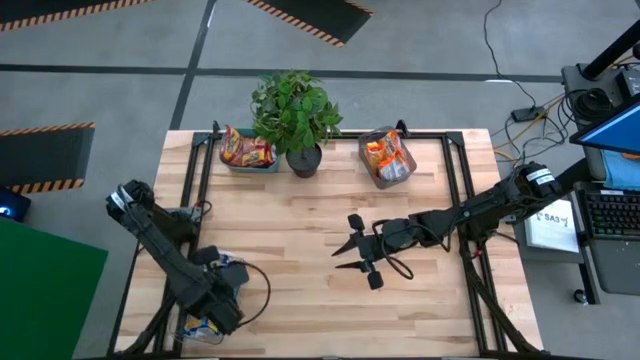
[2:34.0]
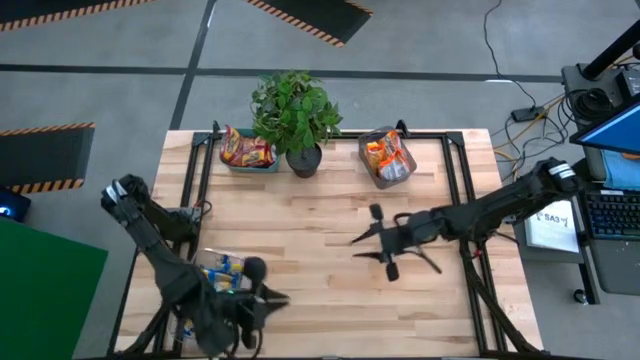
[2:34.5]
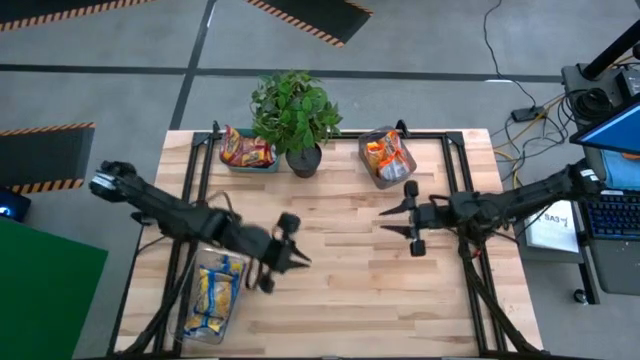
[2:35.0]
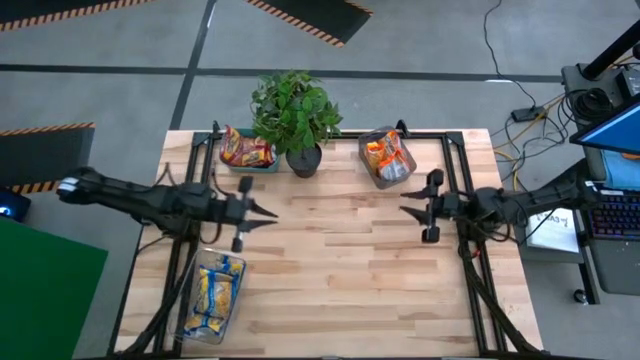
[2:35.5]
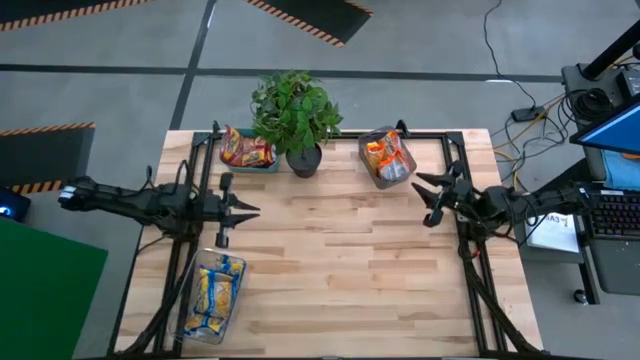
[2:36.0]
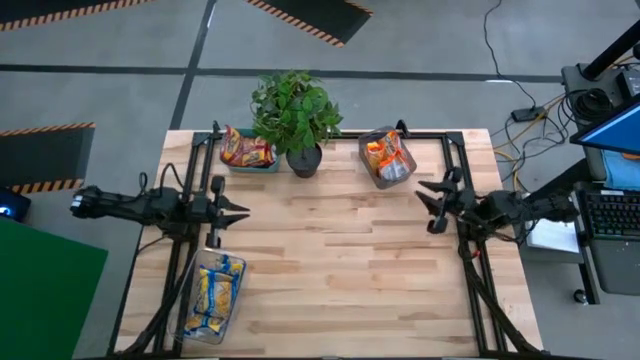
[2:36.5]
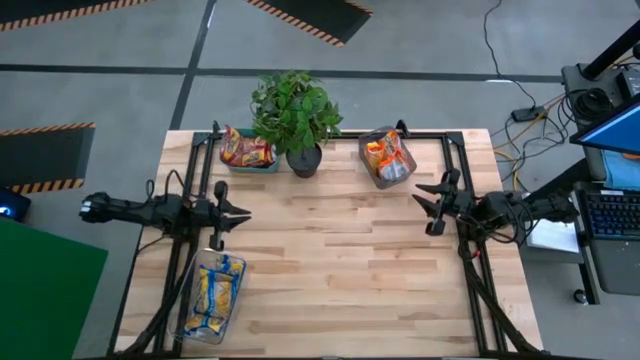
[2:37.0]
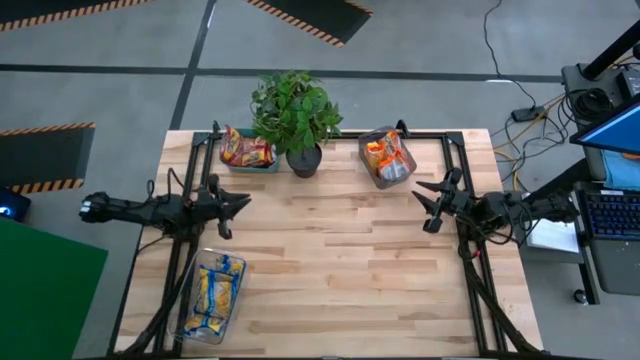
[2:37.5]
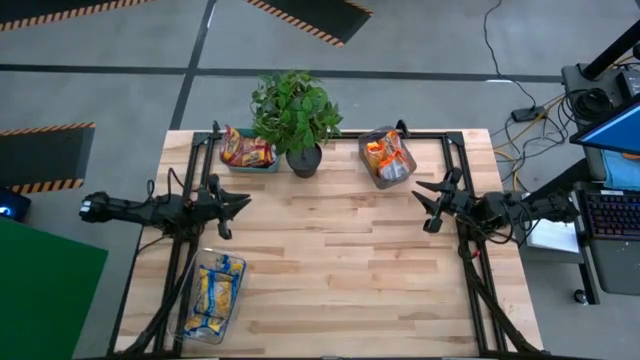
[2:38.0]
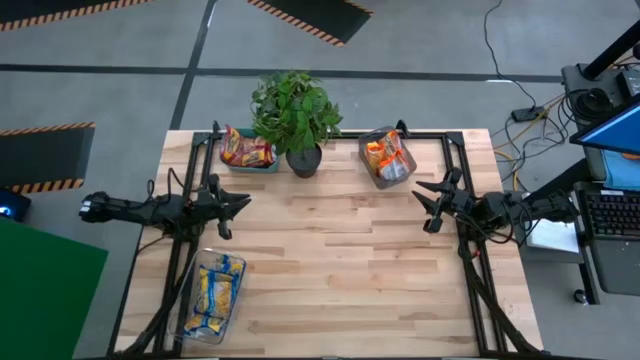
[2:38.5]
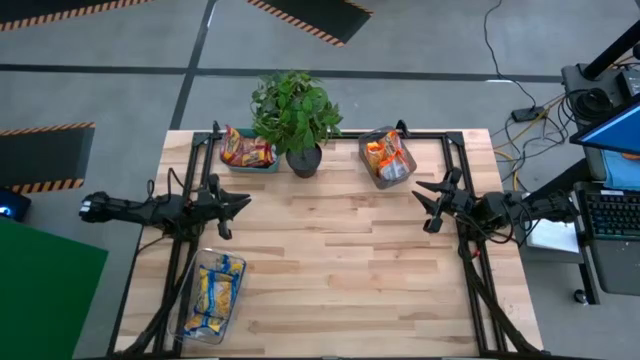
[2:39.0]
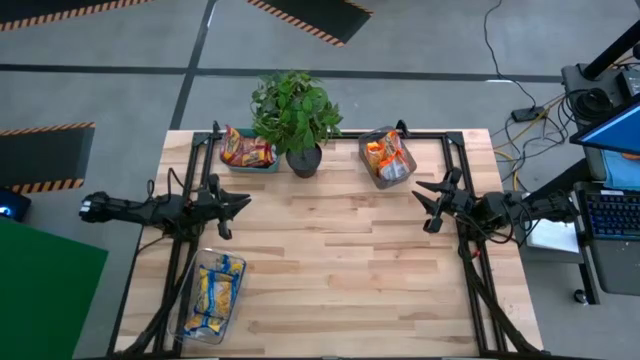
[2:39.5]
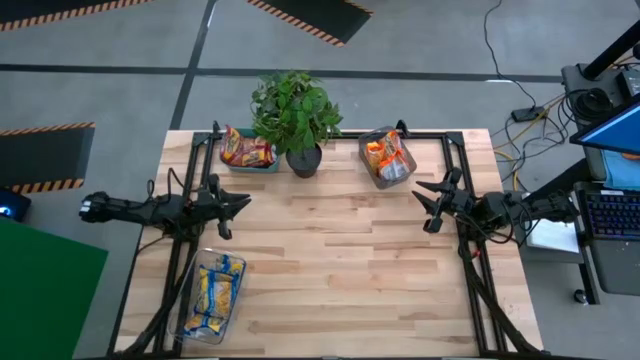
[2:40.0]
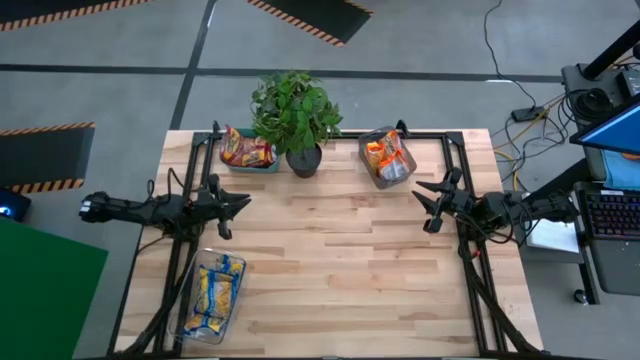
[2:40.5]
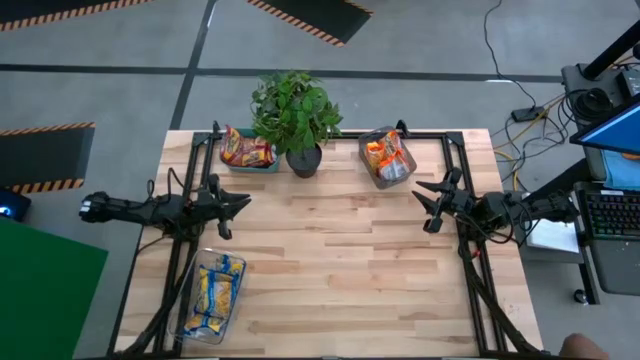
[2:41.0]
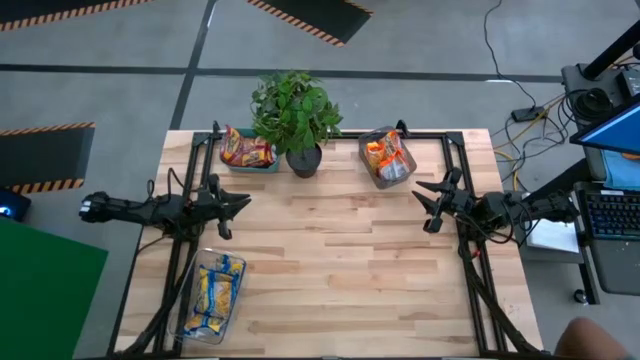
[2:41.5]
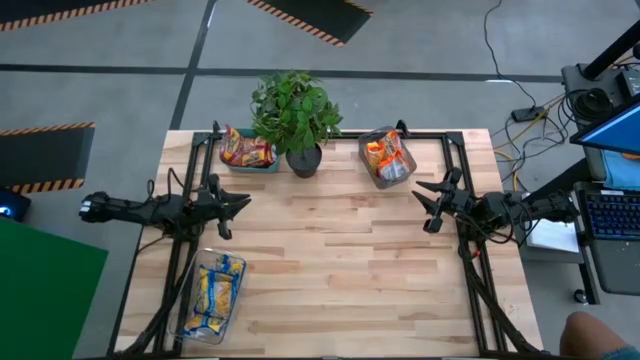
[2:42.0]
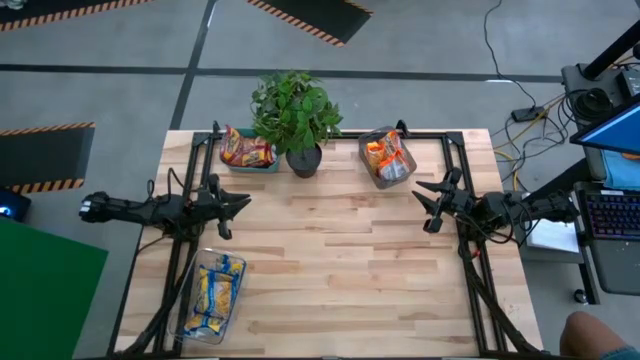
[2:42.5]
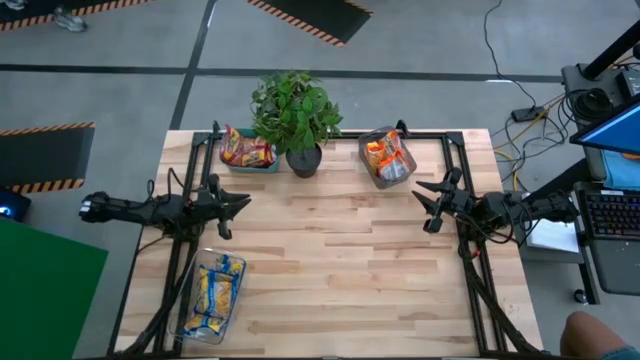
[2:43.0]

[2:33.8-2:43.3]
Task: Sort Maruchan noodles
Return to Home Position

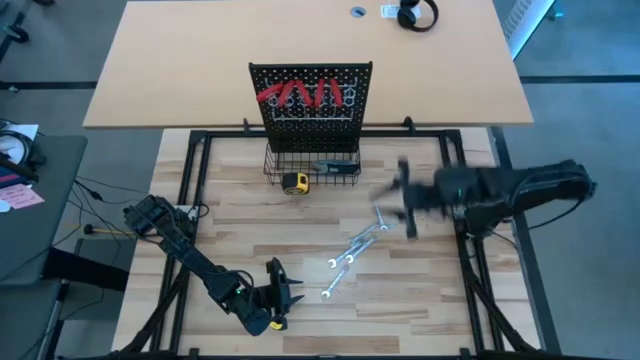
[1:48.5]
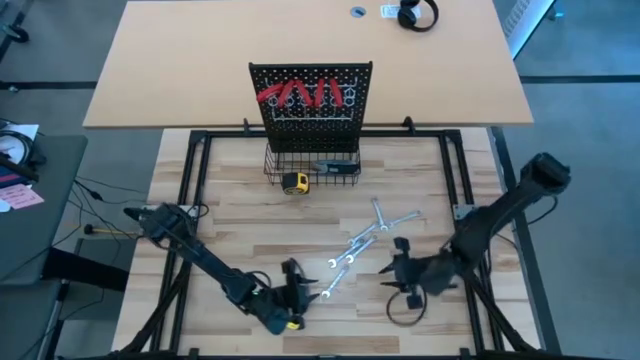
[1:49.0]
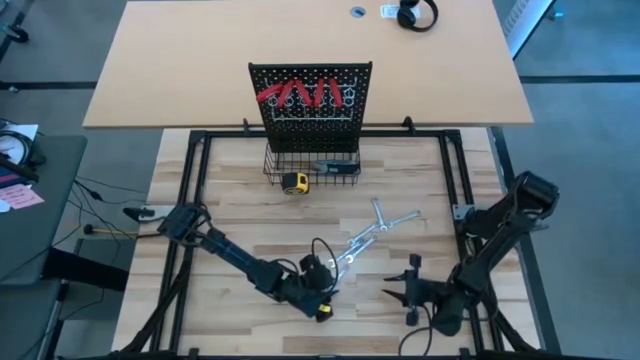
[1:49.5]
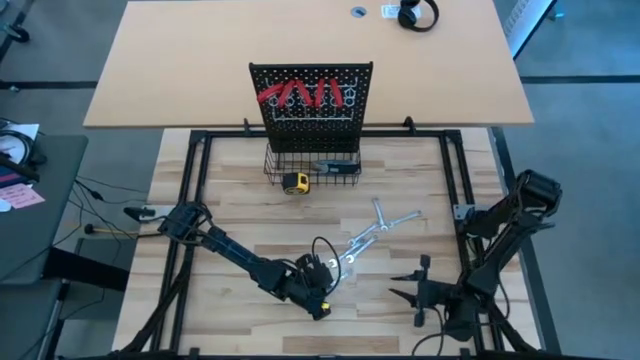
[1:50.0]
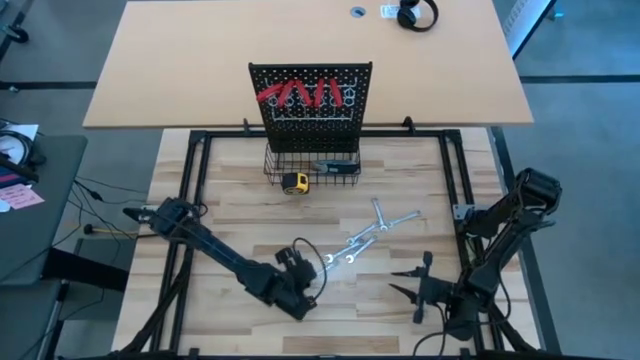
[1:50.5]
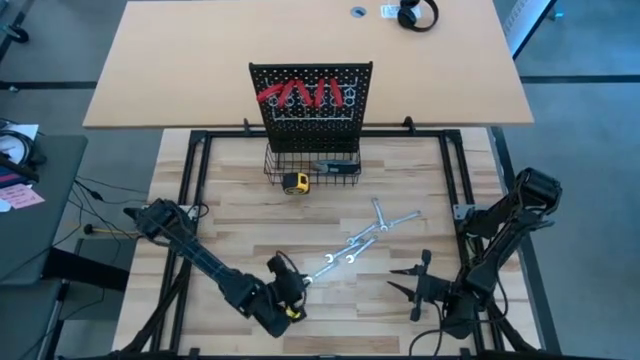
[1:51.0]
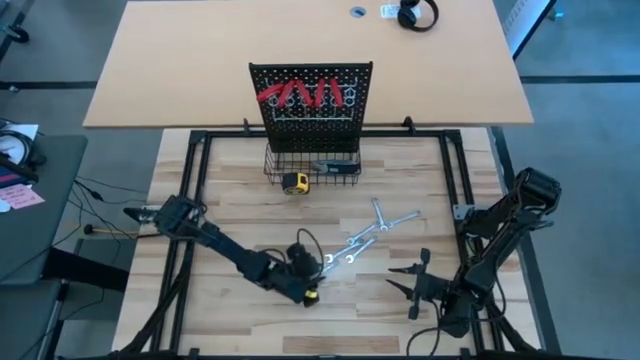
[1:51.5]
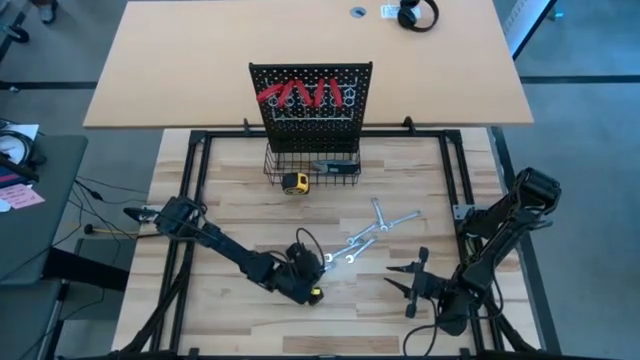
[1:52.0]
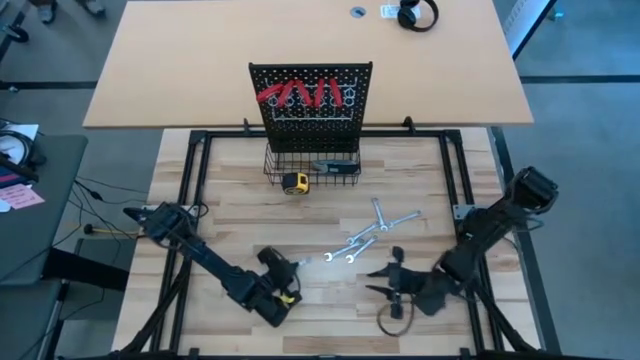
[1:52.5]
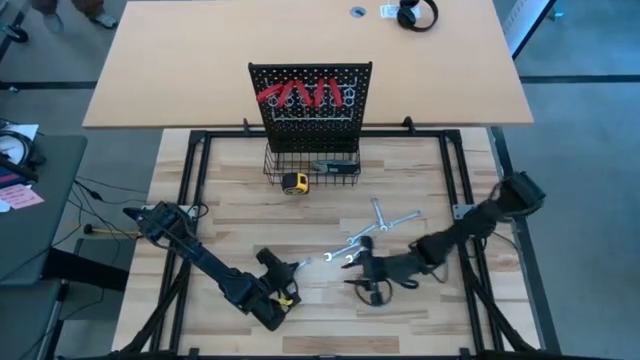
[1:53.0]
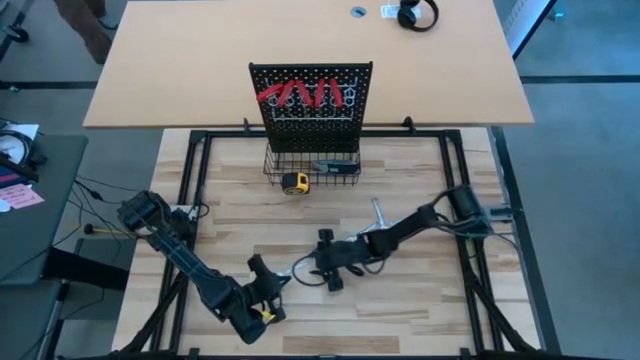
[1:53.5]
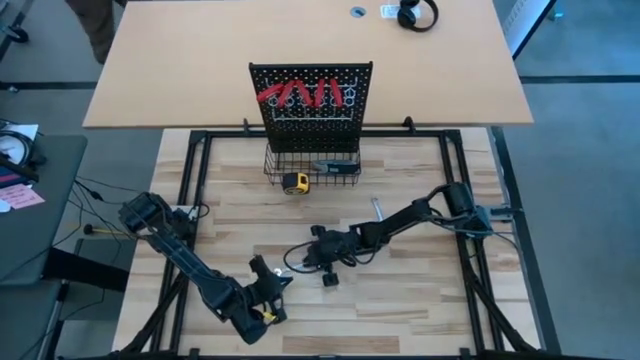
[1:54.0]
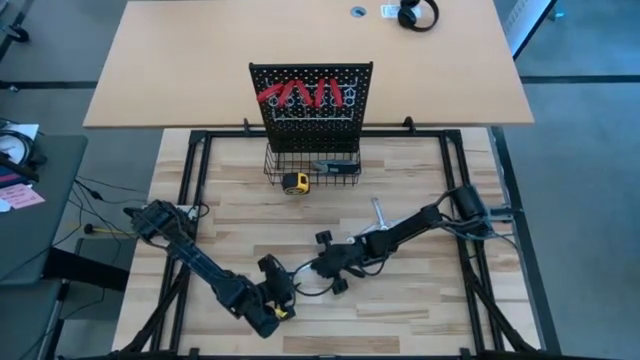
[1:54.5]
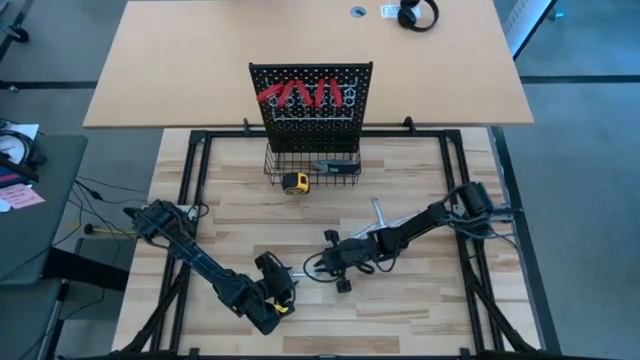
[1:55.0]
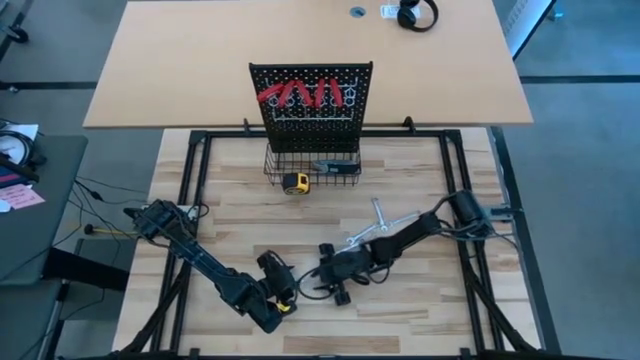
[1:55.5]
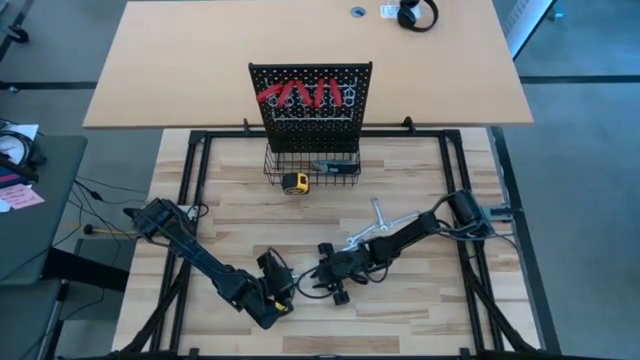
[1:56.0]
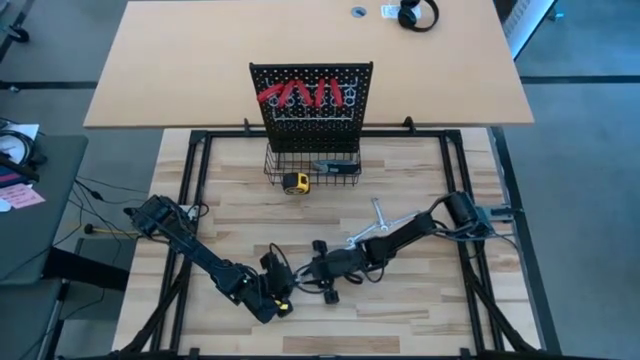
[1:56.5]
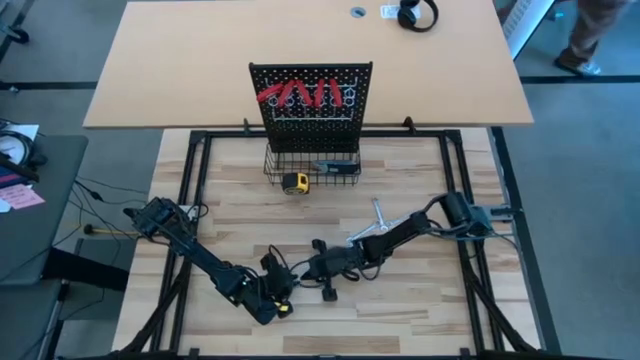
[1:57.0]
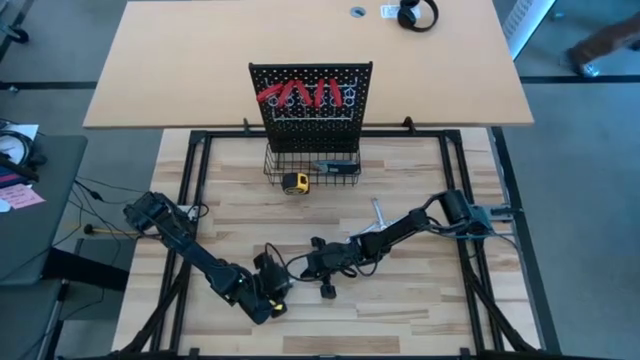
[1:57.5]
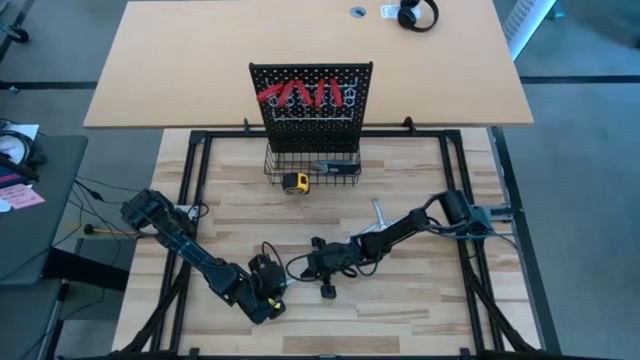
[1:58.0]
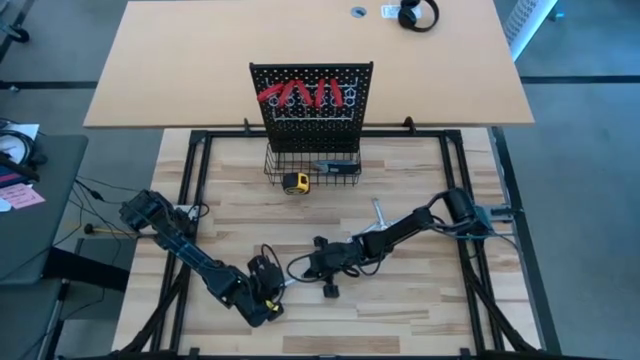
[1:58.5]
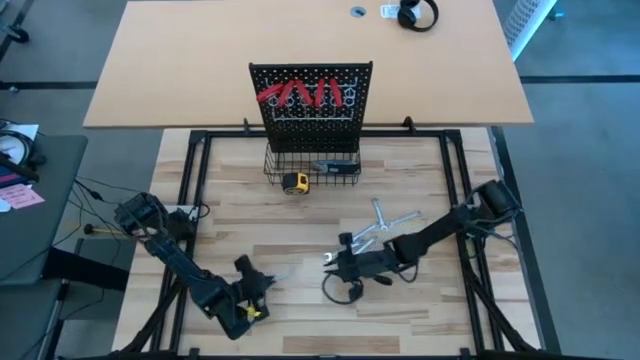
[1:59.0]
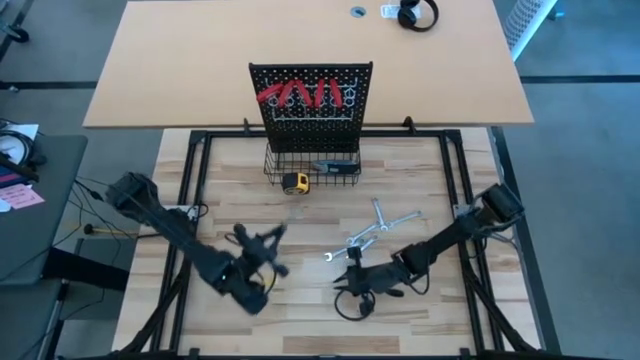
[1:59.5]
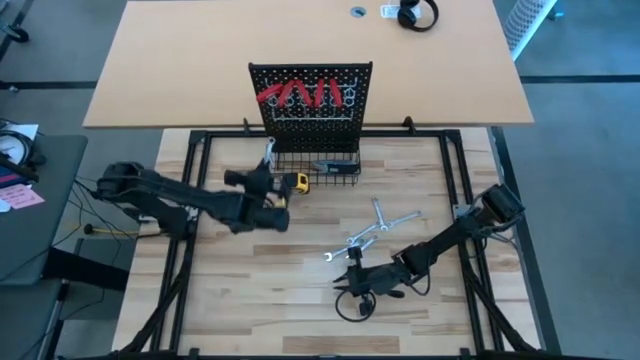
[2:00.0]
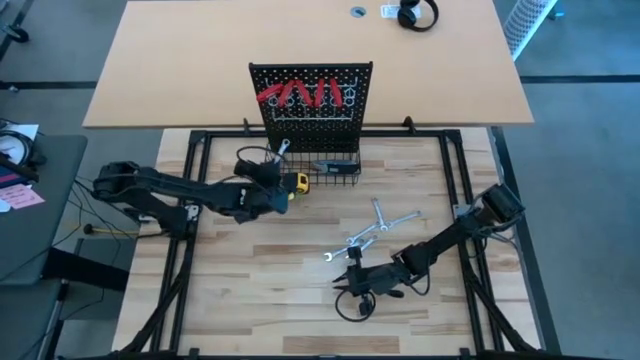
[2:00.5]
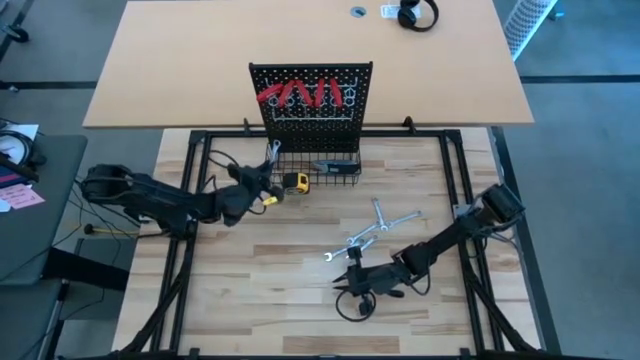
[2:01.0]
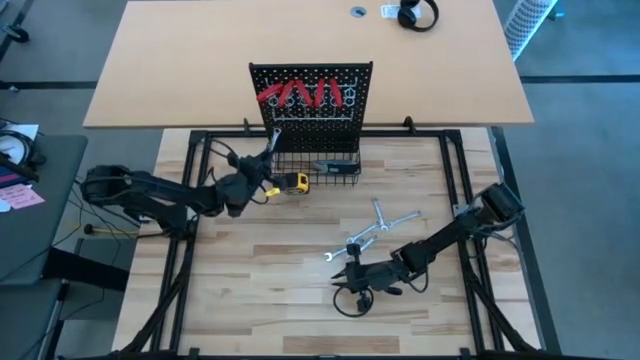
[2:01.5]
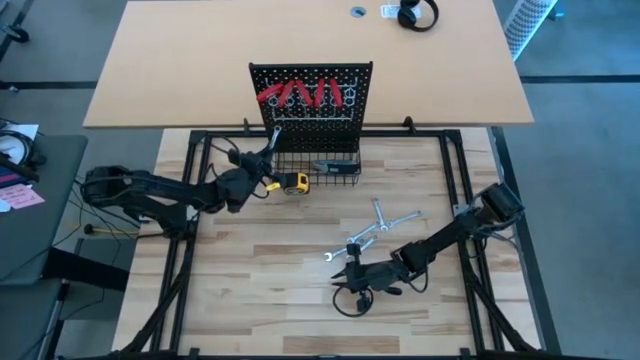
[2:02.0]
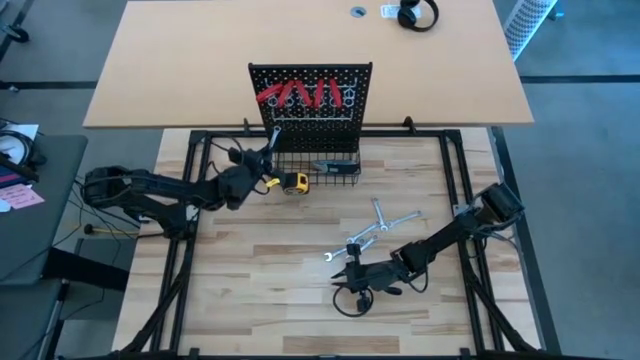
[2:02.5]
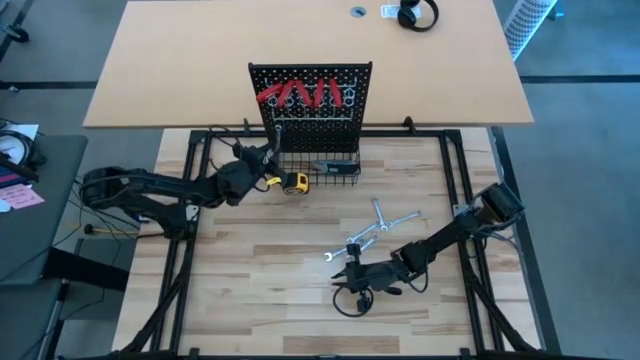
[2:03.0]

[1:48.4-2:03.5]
Task: Hang tools onto peg board
Hang the wrench into the pegboard
